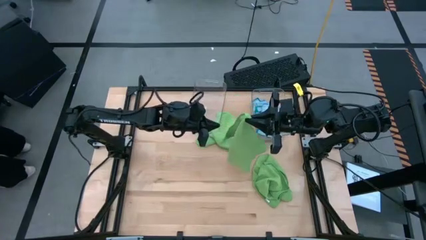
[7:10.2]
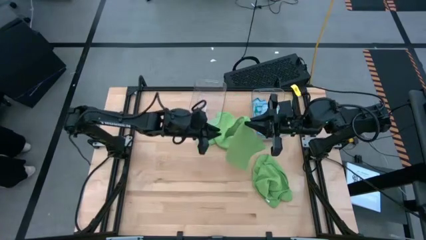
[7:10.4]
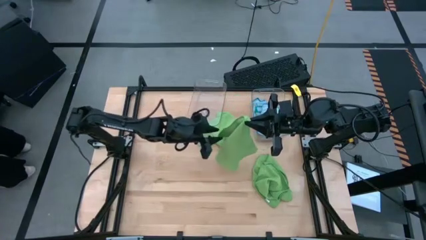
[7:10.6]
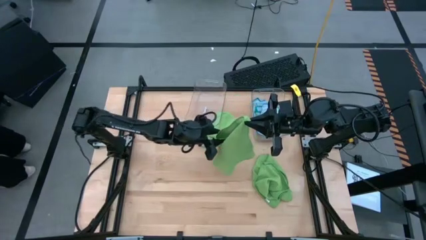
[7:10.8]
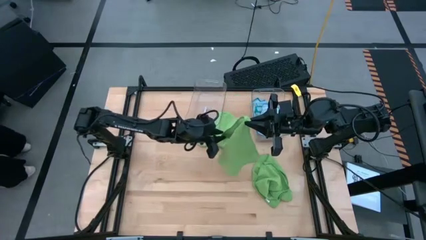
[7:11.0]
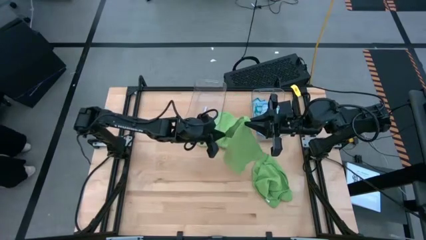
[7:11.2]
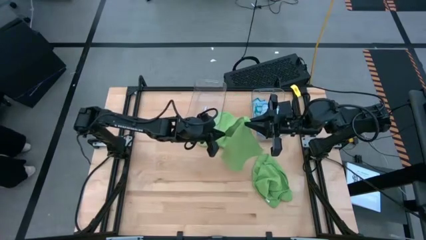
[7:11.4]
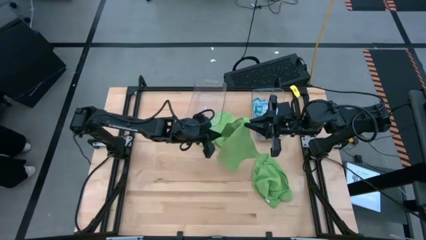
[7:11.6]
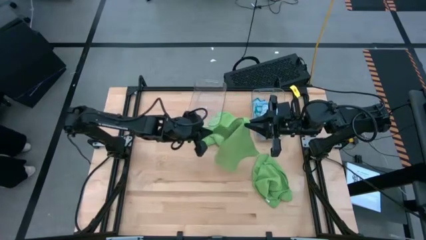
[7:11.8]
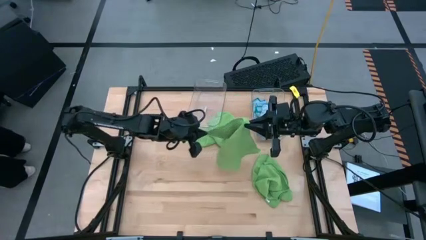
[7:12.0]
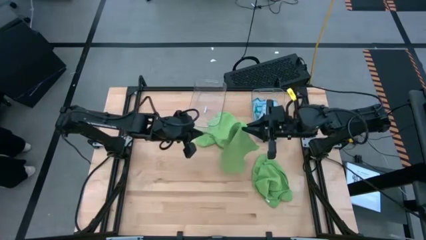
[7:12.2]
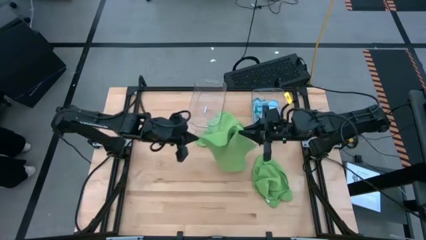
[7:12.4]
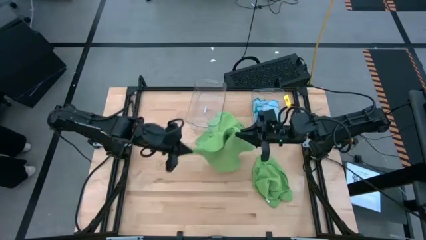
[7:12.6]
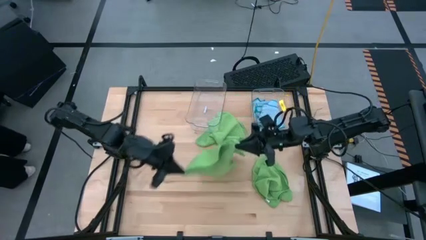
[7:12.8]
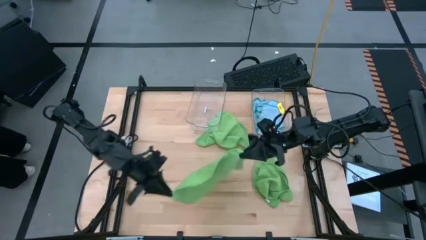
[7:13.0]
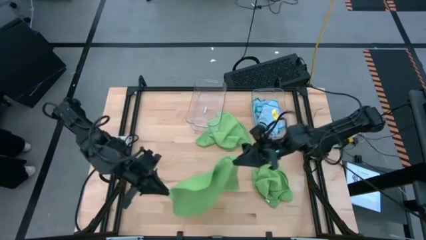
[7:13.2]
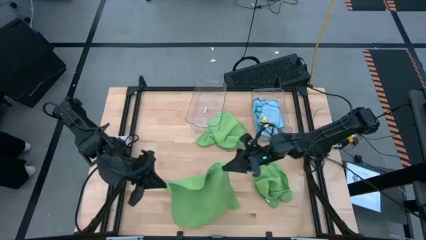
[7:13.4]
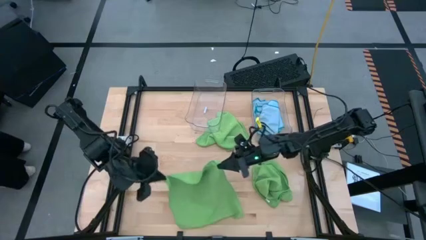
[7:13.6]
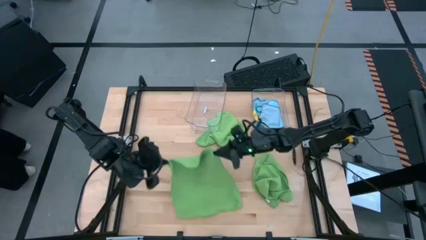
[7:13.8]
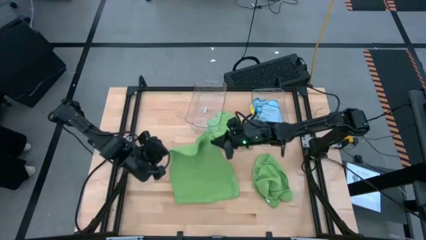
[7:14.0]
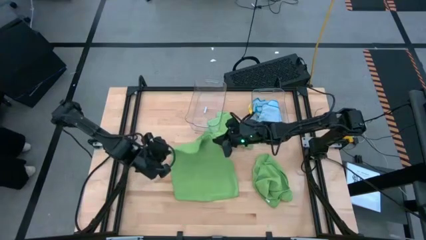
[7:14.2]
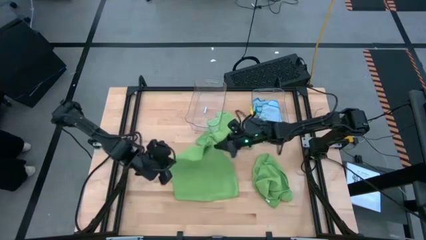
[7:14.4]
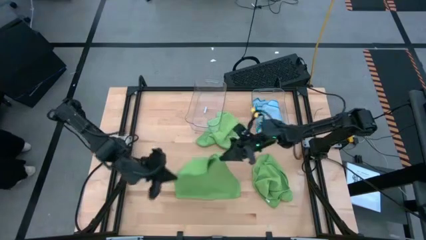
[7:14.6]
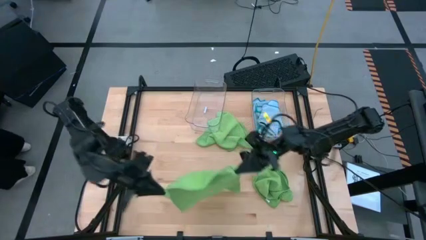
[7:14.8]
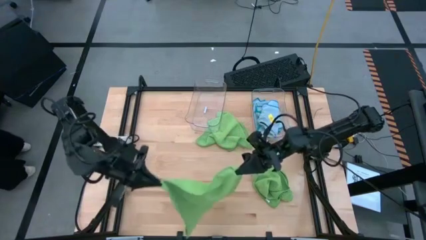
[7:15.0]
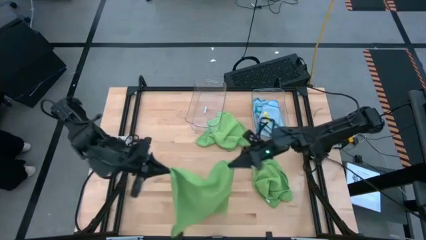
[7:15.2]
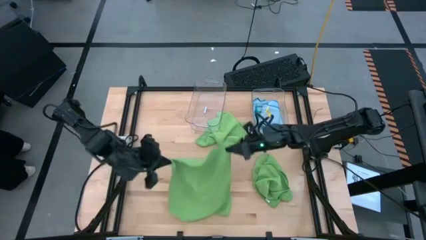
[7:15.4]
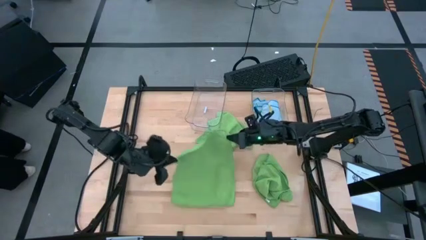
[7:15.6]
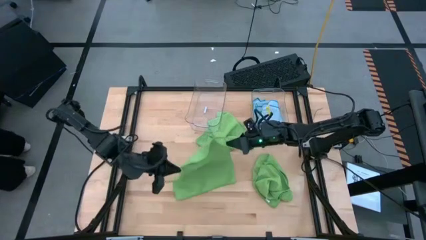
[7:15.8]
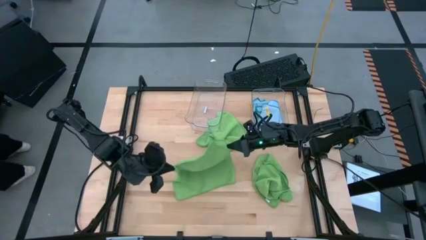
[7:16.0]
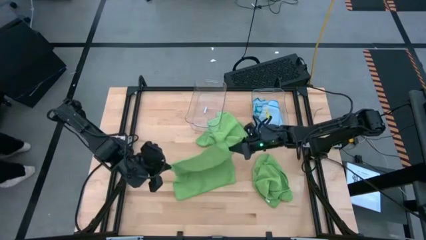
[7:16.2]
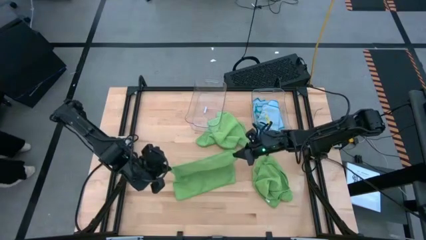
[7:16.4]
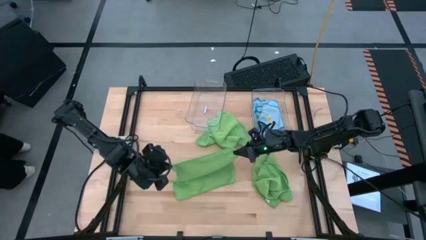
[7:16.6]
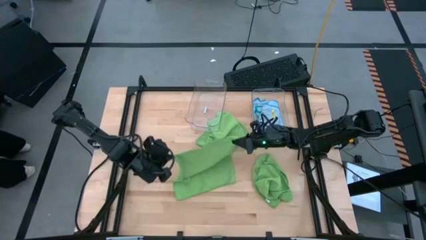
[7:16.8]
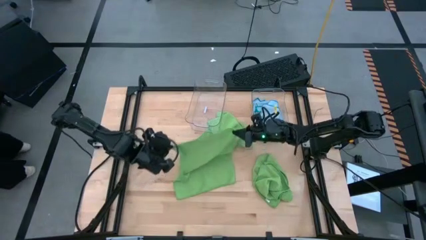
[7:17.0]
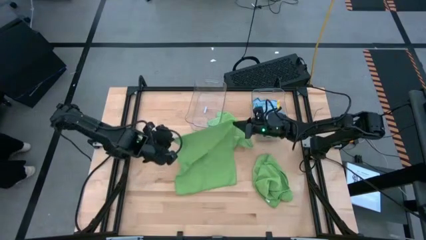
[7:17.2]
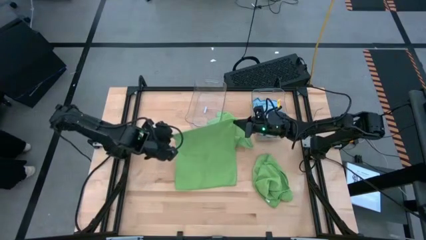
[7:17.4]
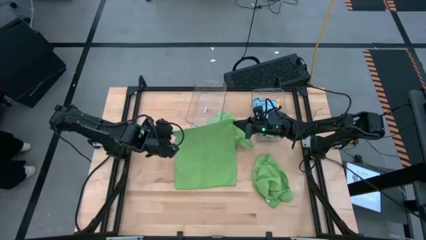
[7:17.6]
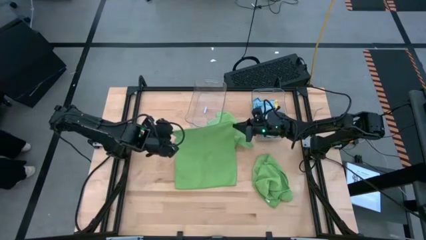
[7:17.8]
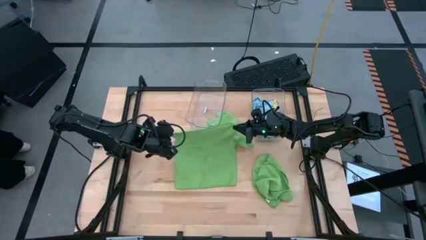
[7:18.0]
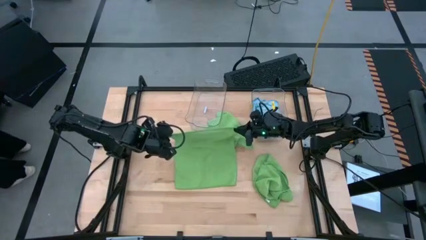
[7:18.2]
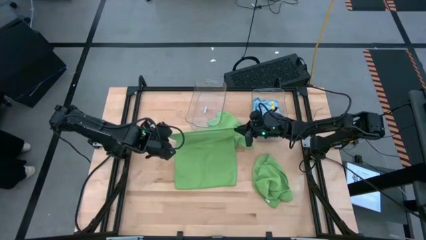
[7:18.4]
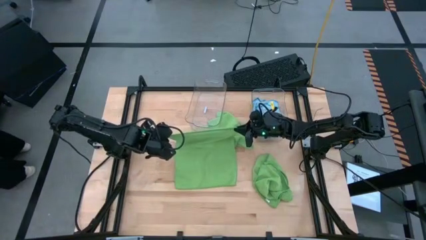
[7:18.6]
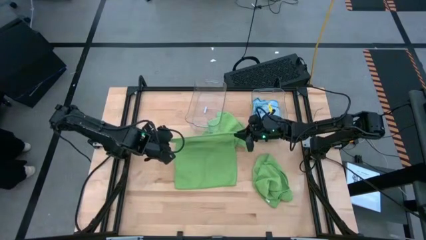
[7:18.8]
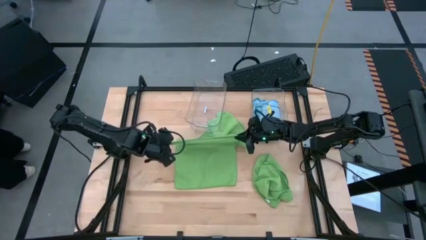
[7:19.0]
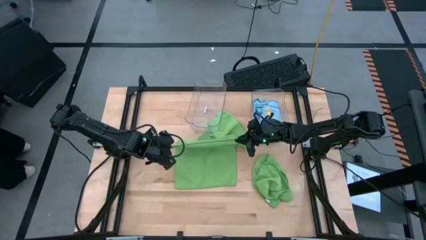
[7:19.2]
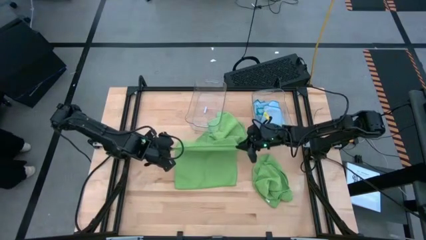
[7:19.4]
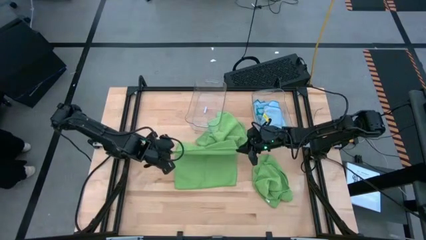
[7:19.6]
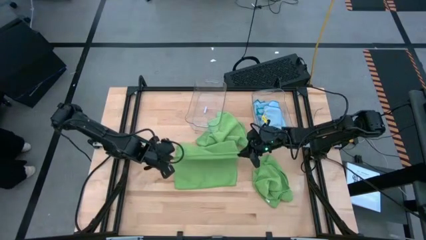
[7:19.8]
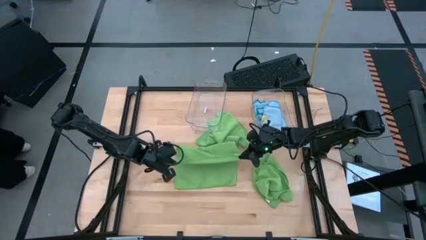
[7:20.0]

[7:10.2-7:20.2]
Task: Fold microfiber towels
Fold the bottom left green microfiber towel

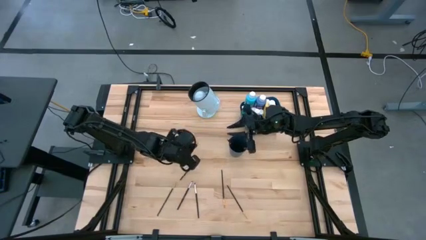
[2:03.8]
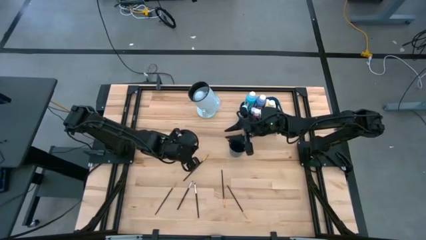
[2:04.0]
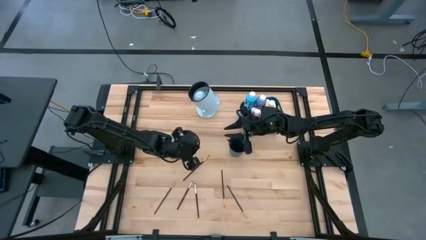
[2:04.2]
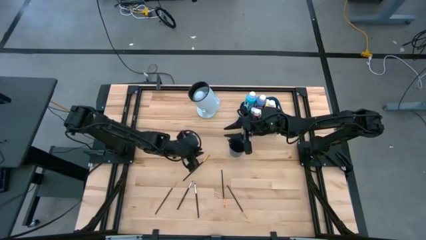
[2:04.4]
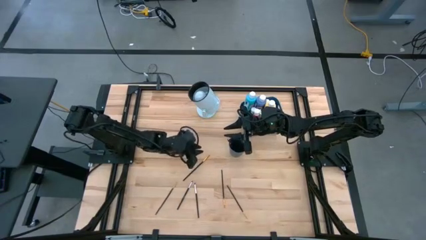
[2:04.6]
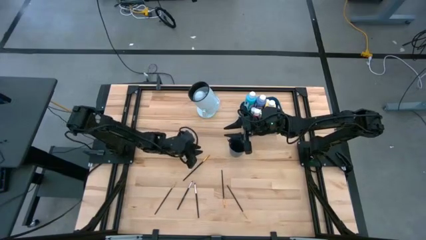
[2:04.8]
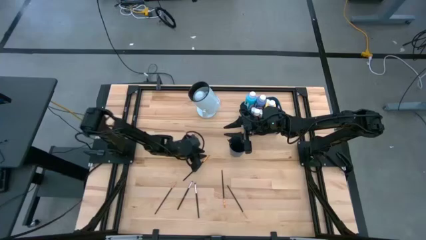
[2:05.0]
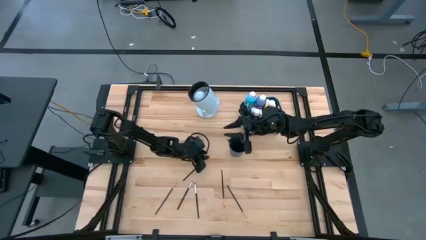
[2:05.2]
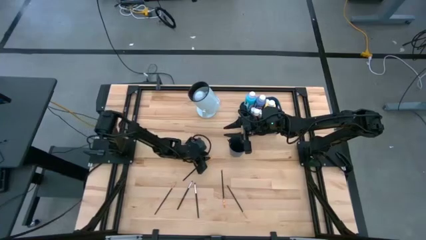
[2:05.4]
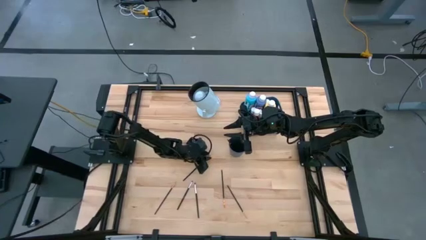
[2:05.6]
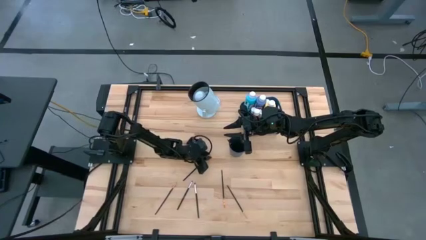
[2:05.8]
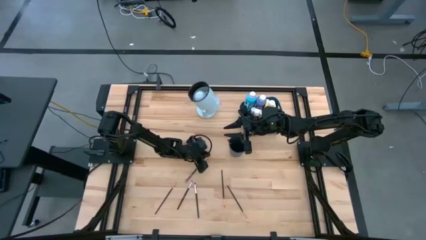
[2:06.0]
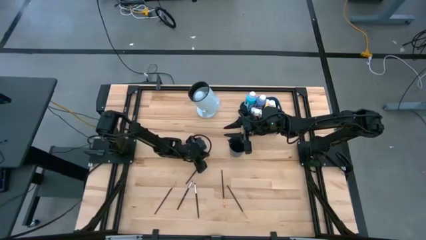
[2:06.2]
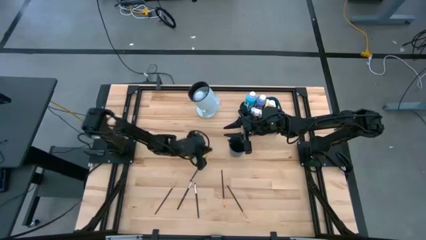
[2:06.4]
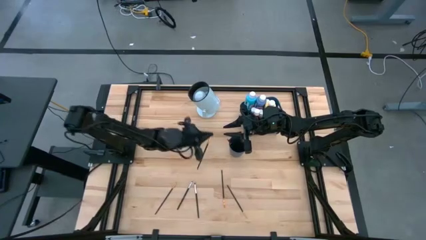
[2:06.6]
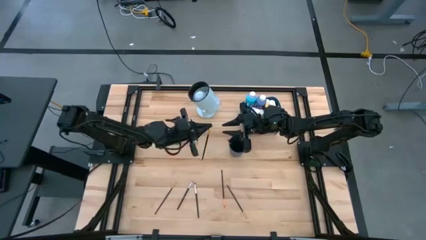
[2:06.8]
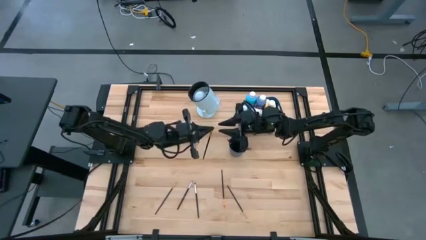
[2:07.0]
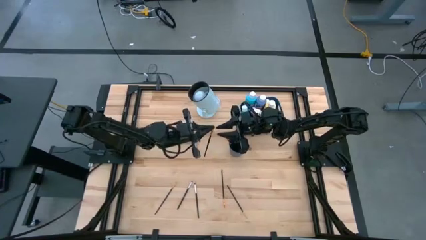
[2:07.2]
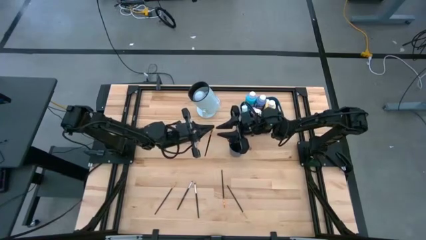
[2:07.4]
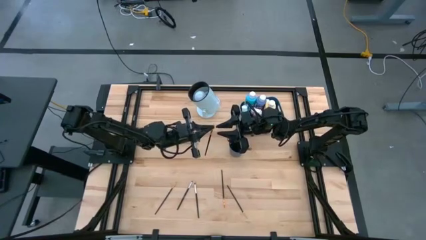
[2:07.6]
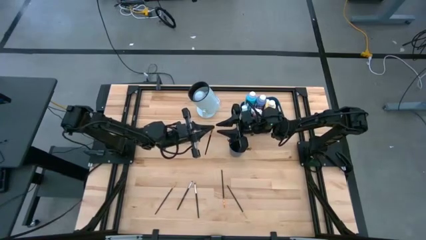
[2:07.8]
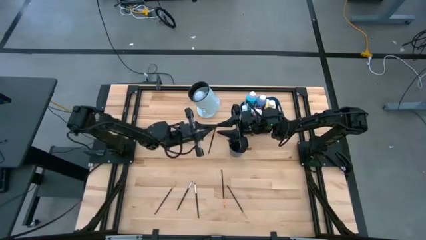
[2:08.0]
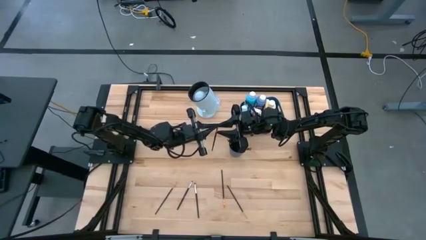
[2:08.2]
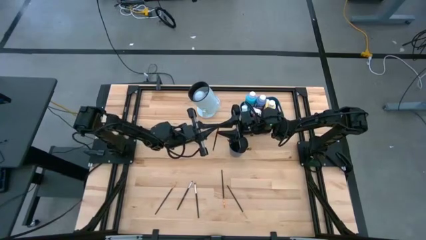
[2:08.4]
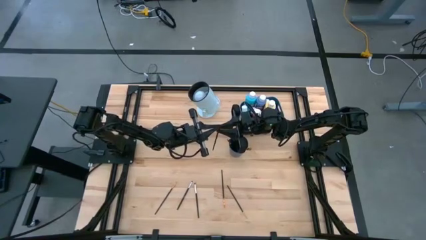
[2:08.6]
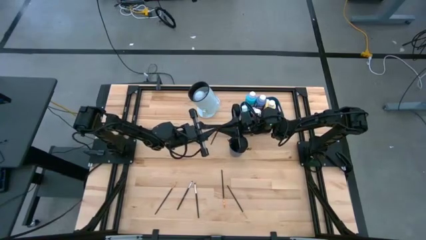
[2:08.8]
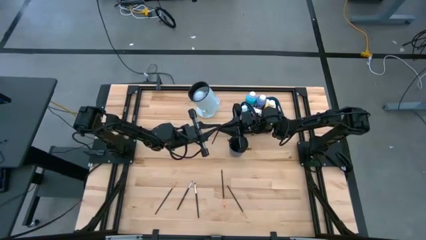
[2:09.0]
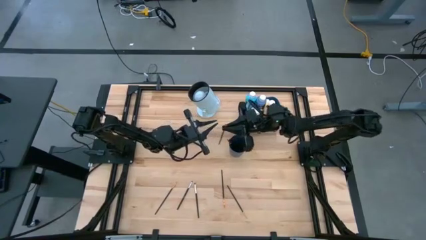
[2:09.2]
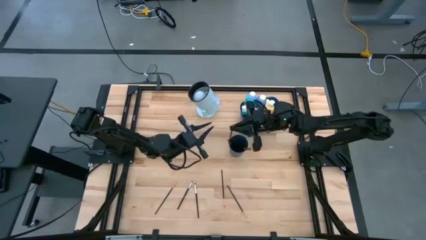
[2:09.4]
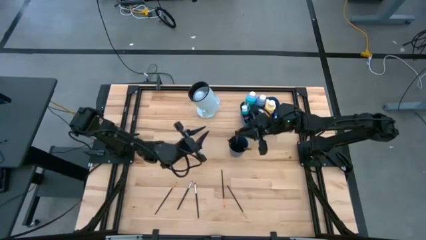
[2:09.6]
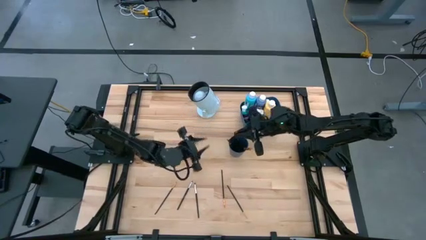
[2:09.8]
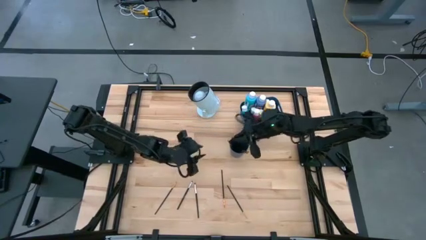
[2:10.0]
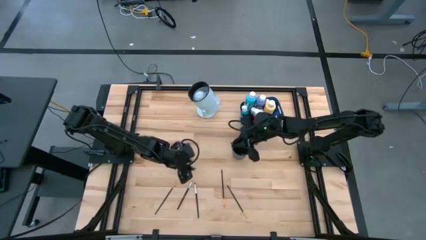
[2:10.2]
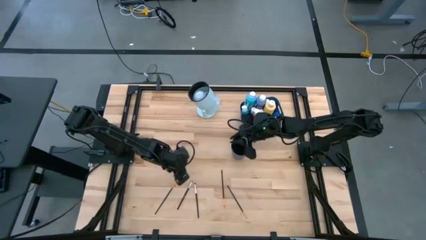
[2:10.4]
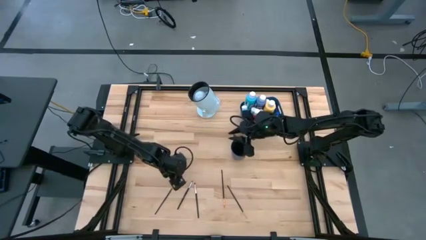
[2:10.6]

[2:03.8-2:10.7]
Task: Pick & Place Paint Supplies
Put the gold paintbrush into the blue cup
